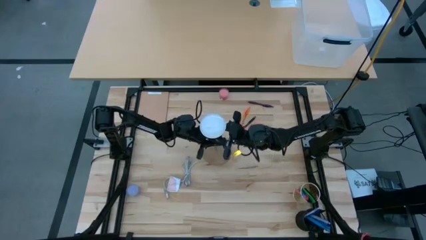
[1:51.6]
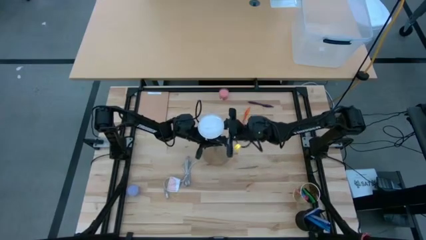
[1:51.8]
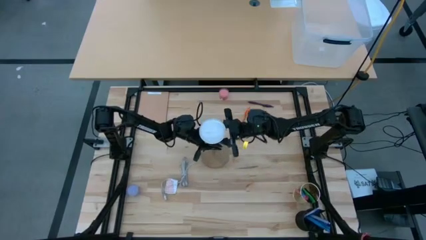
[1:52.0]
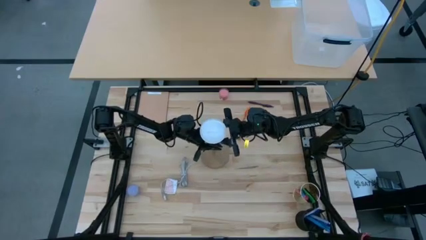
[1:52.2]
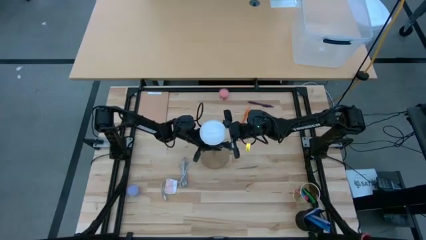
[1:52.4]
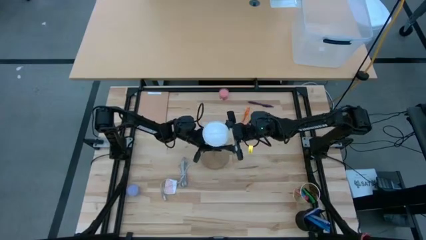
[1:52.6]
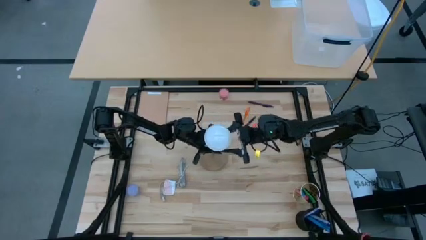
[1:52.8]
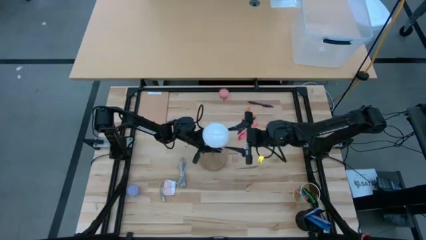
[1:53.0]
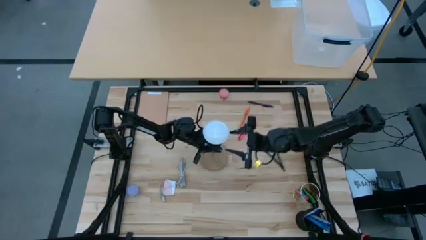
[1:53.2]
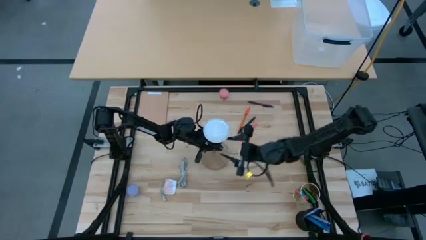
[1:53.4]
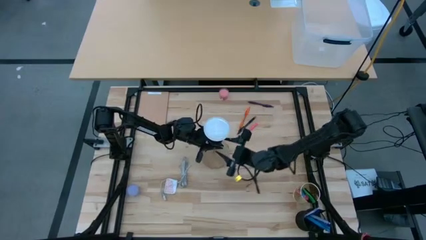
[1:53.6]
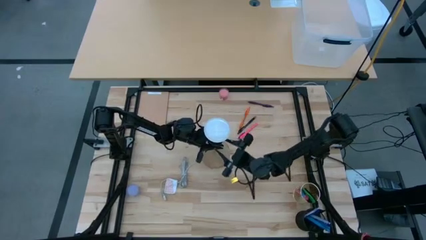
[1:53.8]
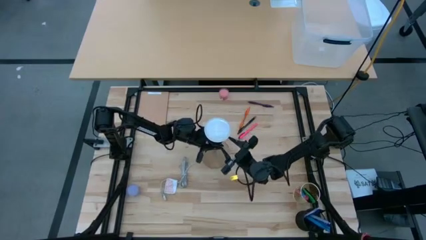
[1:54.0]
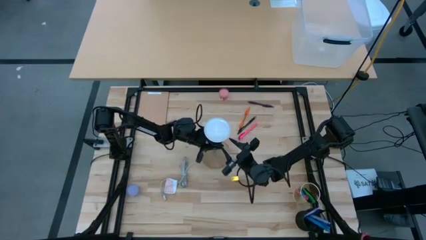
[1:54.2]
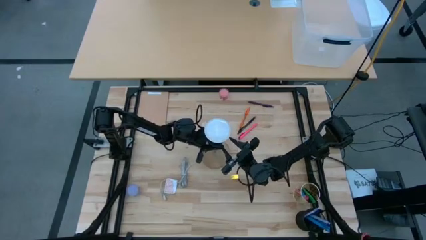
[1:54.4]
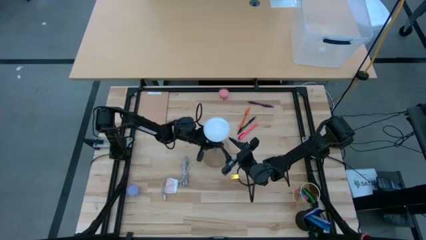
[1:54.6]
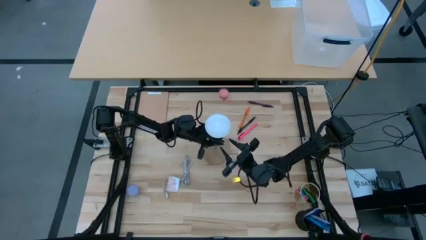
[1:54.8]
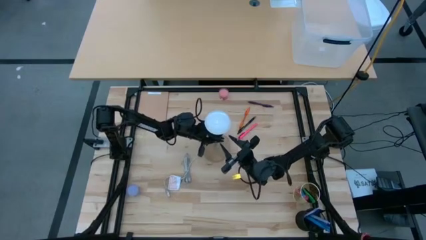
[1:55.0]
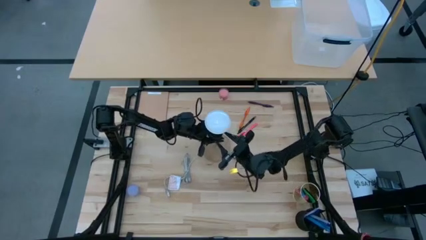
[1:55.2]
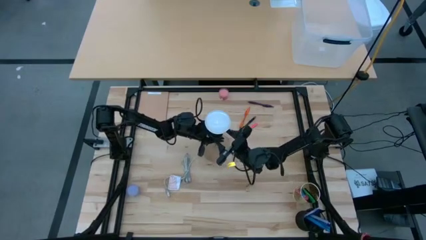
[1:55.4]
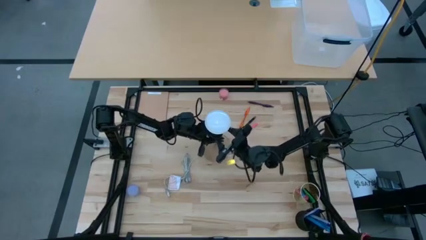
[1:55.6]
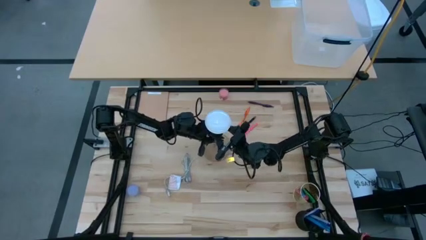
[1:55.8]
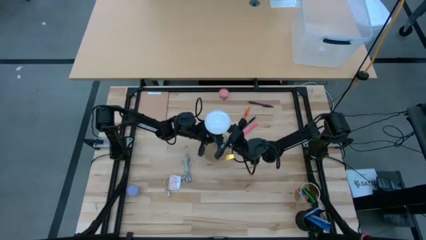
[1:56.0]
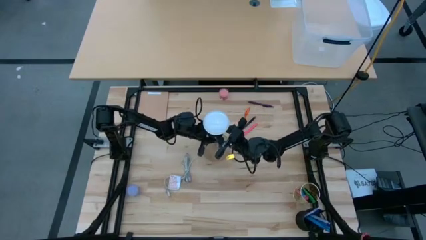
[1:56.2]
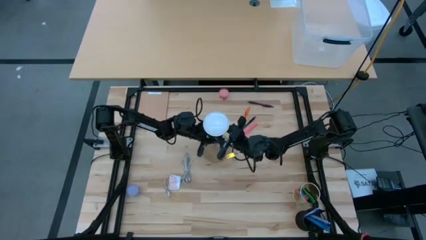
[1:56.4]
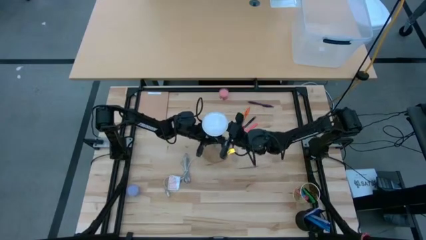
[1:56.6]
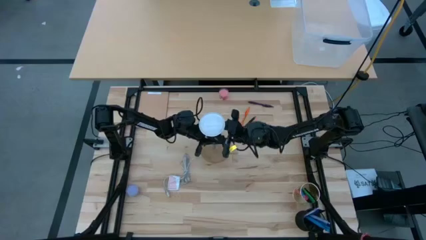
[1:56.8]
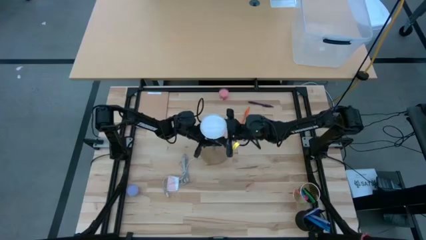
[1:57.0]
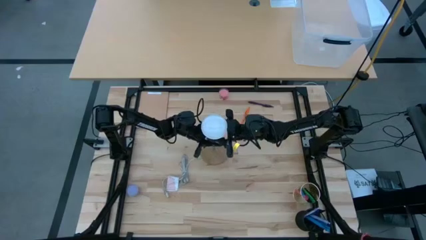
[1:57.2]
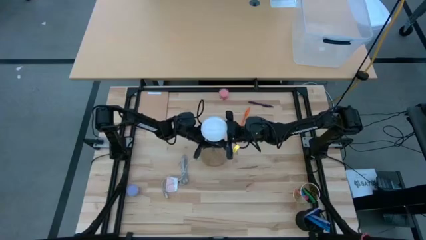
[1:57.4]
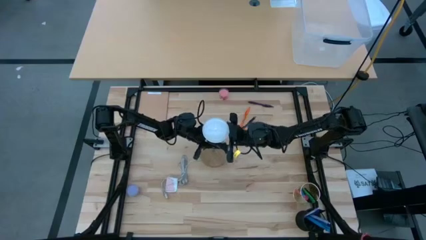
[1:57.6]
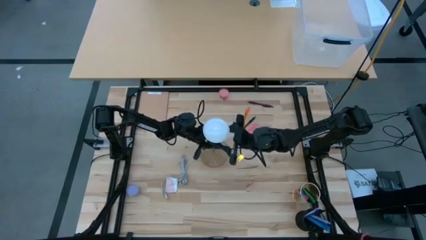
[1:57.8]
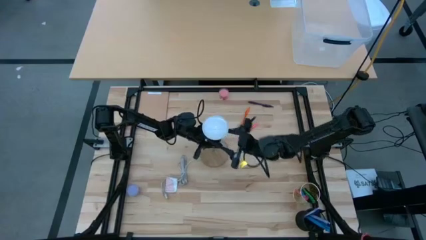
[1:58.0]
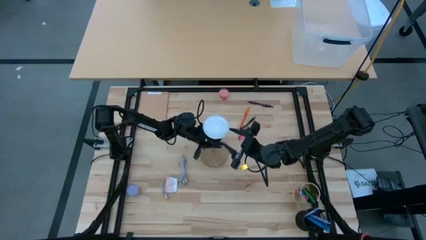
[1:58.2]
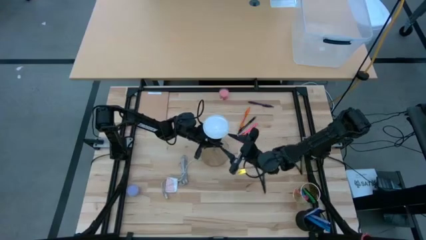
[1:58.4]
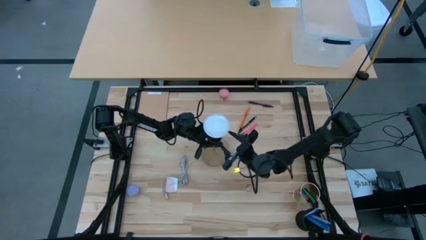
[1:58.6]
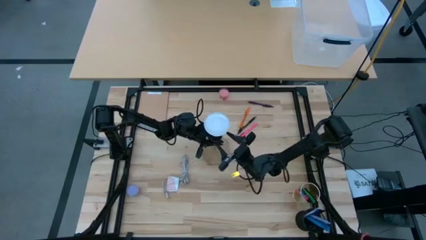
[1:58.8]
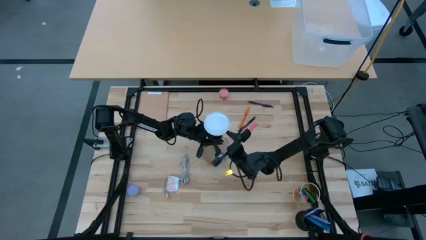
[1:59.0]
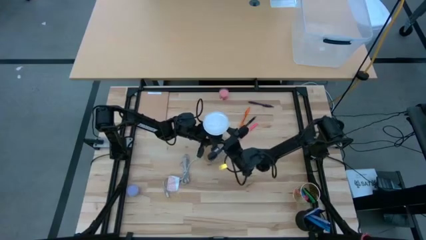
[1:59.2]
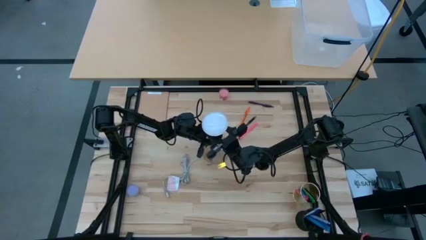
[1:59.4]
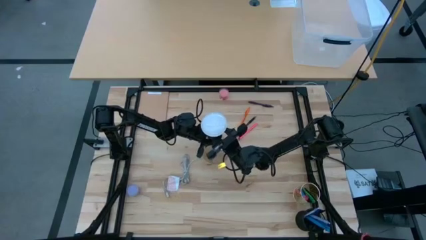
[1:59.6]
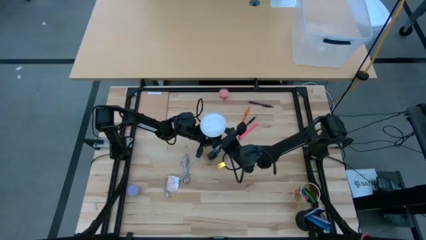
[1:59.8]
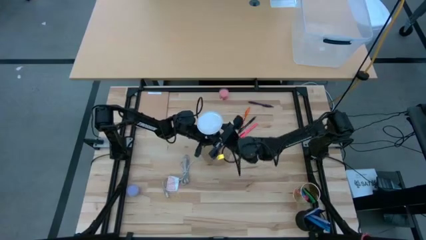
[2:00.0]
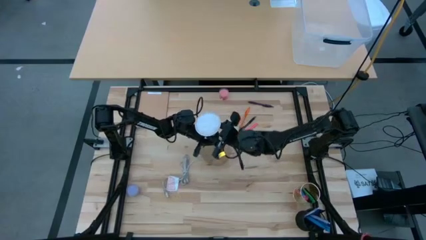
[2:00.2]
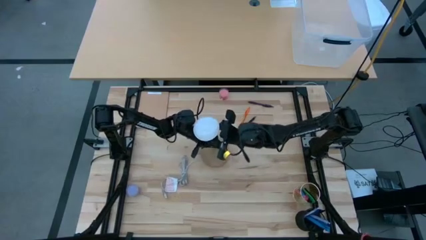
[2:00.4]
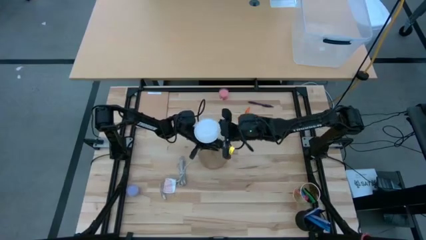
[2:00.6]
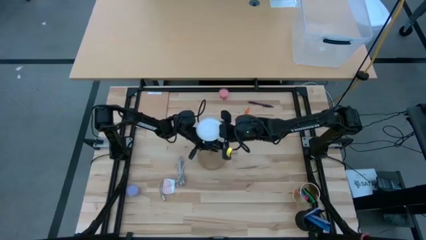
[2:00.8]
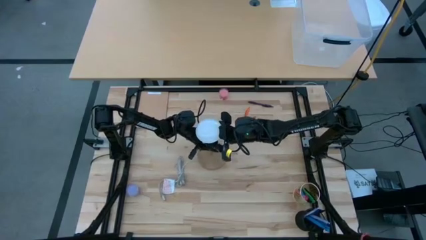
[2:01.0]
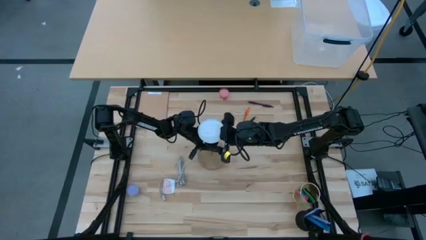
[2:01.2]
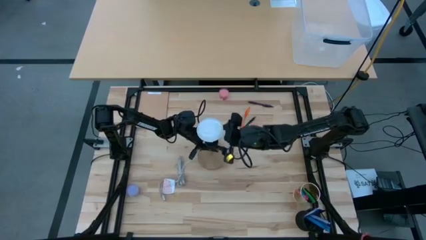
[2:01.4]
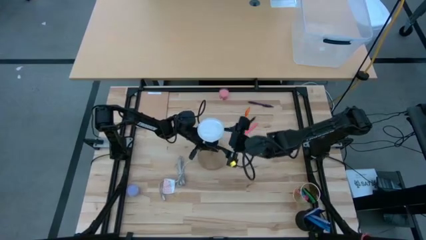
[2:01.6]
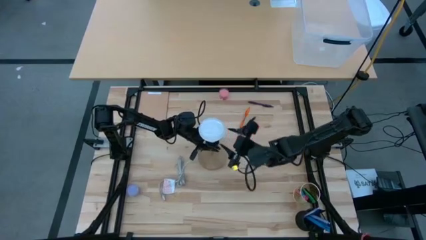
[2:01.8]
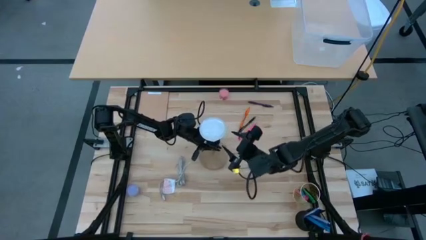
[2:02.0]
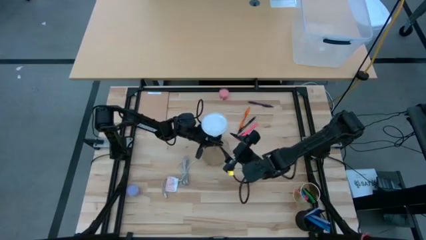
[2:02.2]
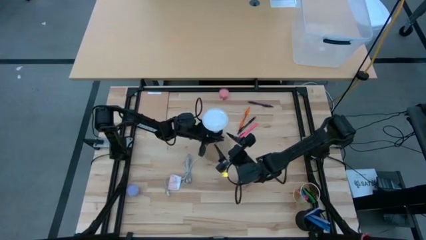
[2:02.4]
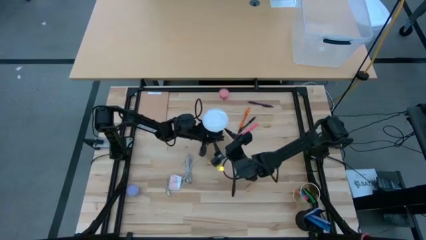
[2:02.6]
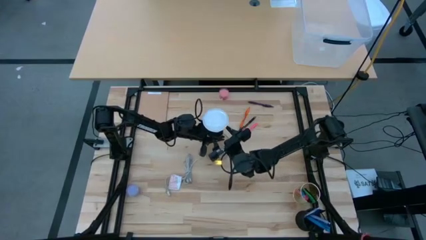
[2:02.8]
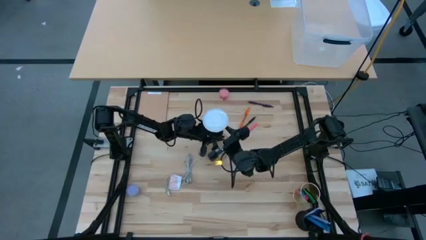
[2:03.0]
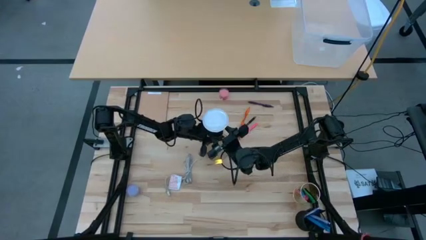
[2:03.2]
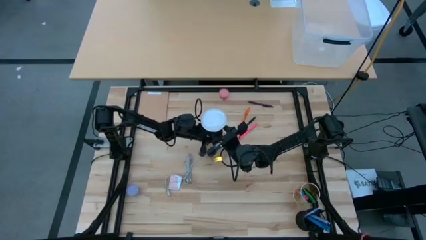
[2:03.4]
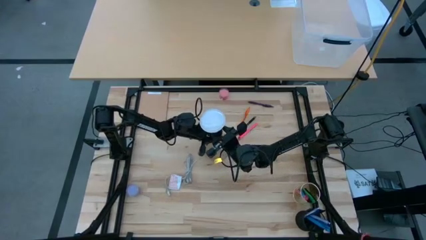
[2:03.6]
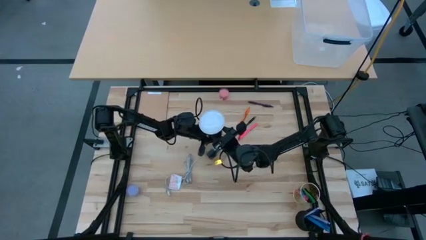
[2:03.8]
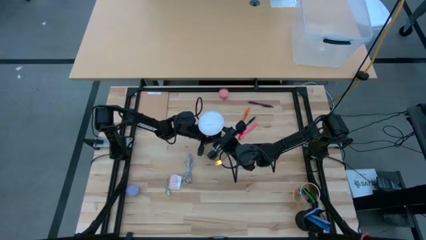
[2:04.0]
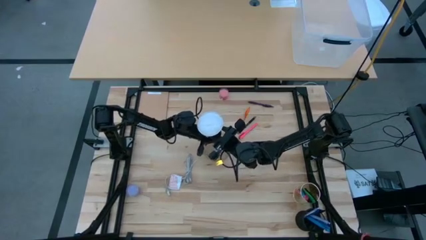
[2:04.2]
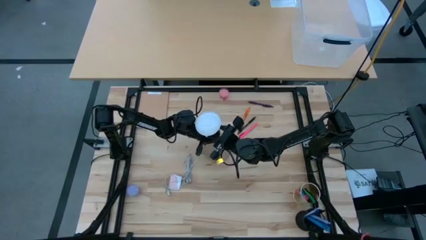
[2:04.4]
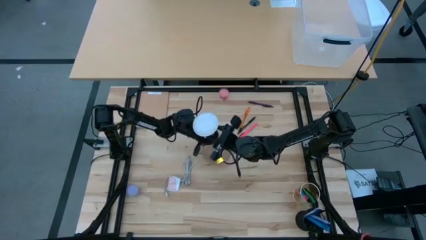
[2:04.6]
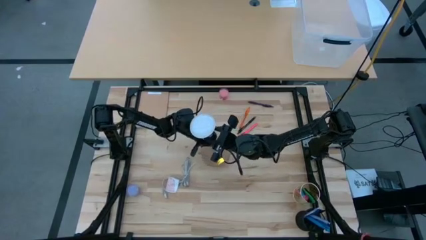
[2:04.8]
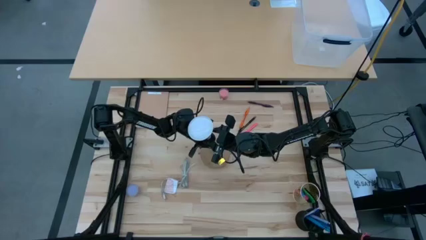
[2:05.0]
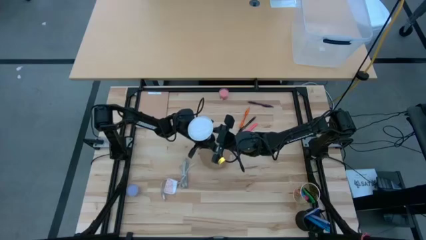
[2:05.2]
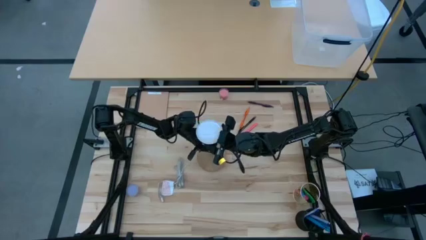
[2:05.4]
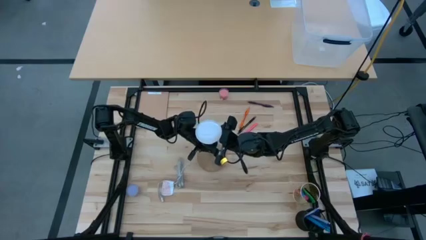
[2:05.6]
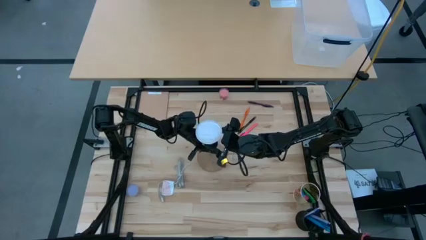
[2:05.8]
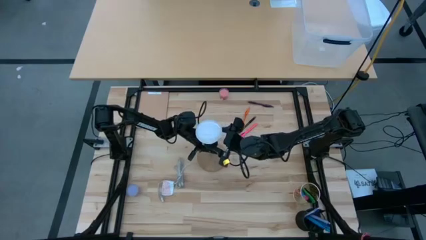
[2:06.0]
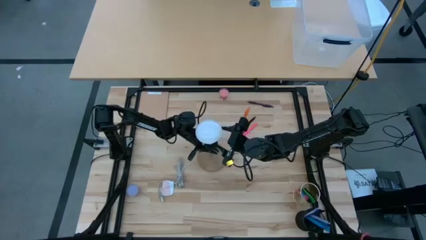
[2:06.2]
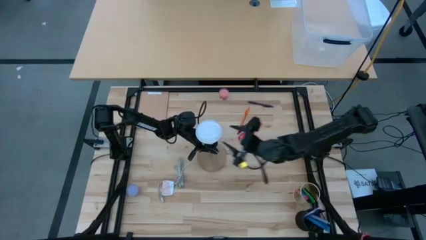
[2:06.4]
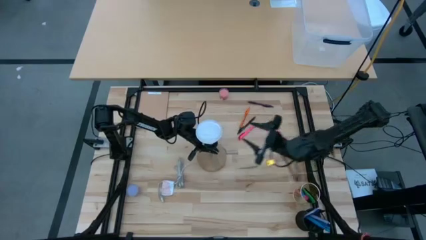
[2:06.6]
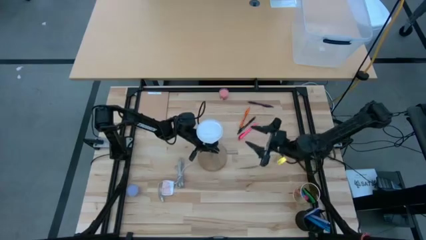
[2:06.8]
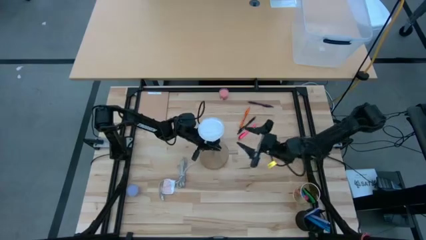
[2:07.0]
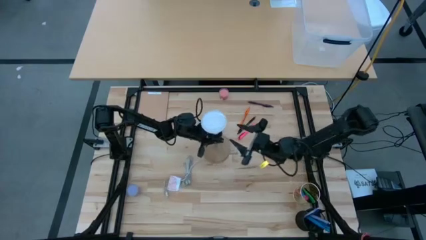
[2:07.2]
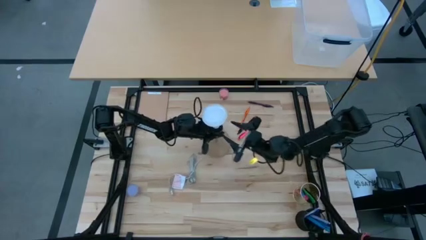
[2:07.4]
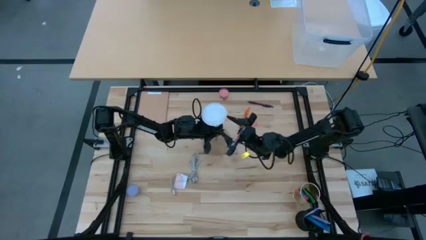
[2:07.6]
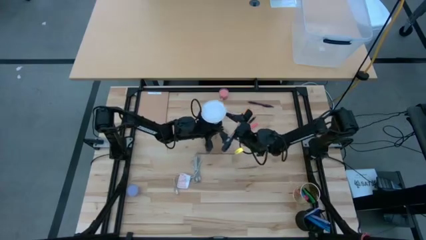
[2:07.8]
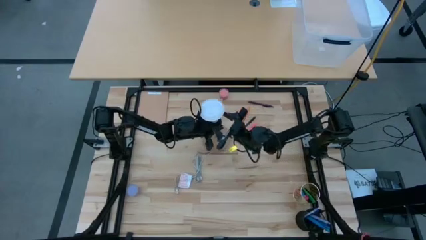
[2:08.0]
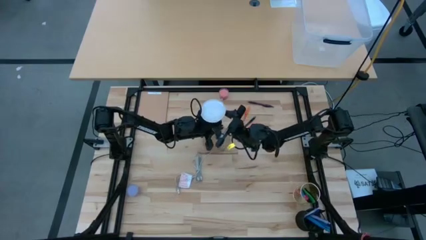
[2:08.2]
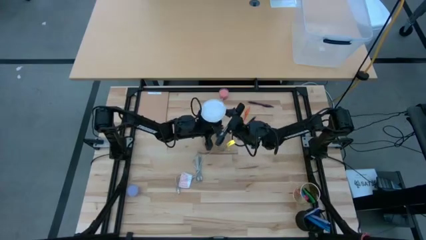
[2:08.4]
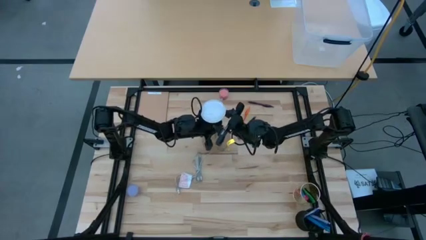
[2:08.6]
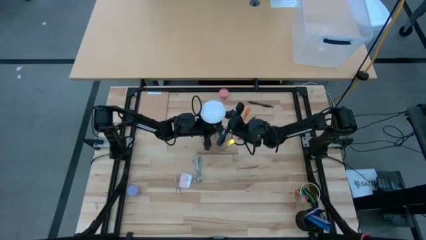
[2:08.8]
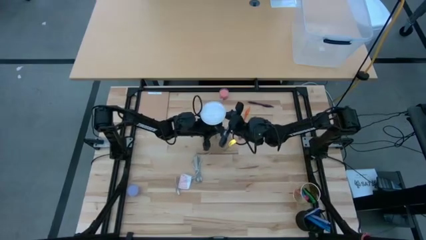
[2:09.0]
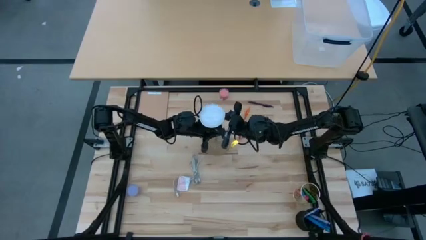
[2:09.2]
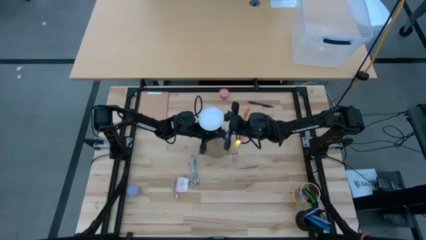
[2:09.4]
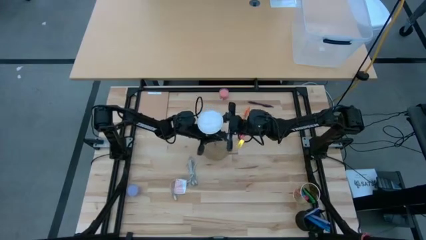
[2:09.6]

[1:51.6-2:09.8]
Task: Screw lightbulb
Remove the white lightbulb from the desk lamp
